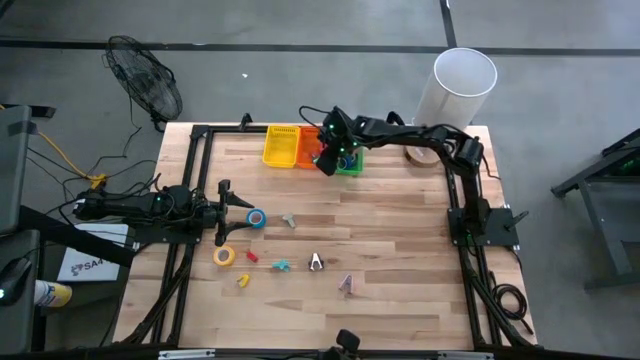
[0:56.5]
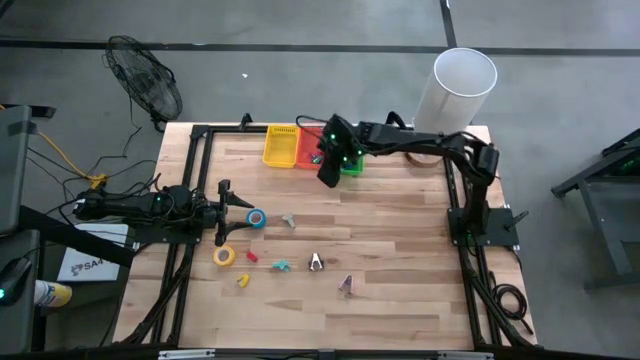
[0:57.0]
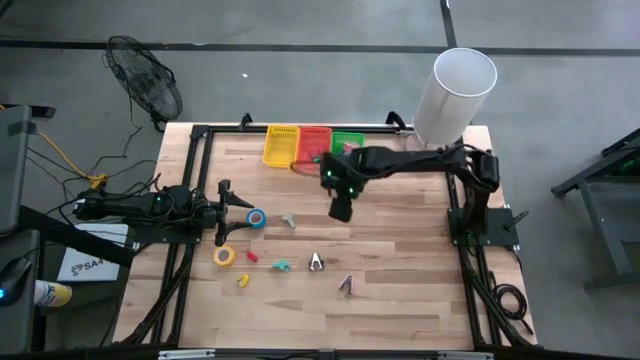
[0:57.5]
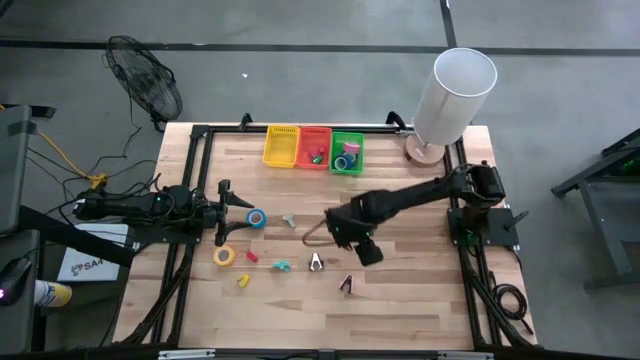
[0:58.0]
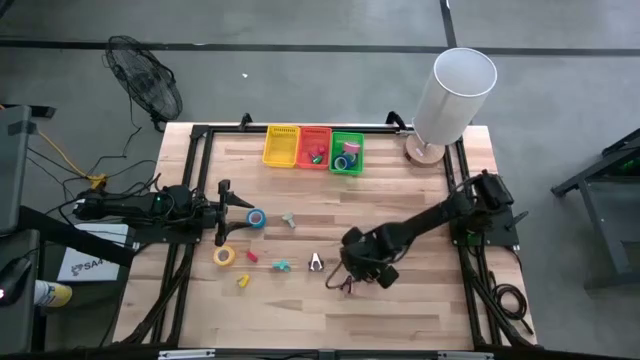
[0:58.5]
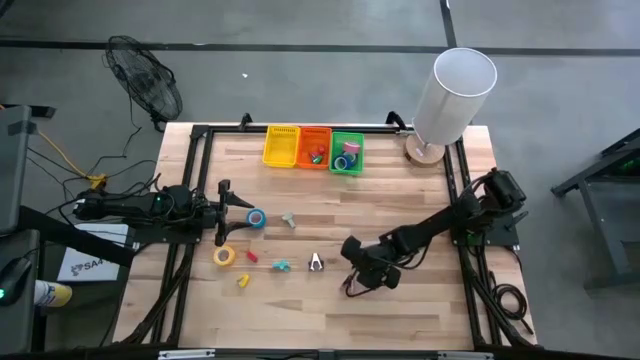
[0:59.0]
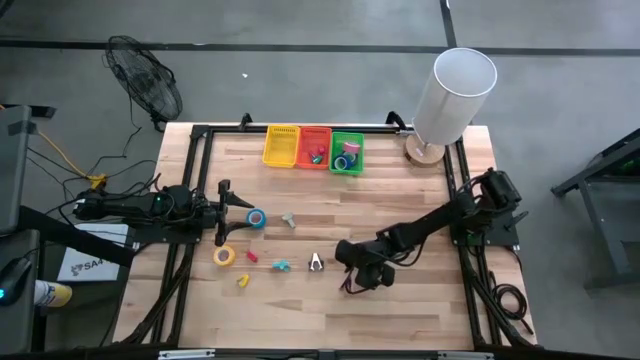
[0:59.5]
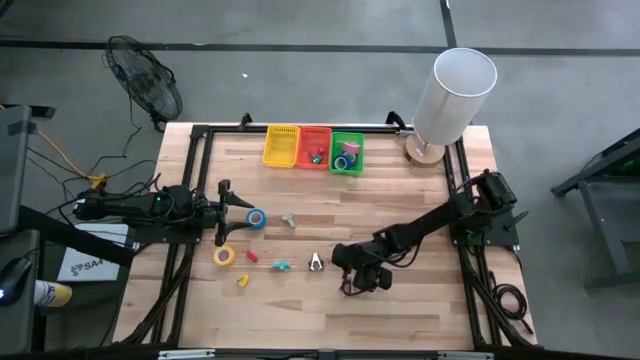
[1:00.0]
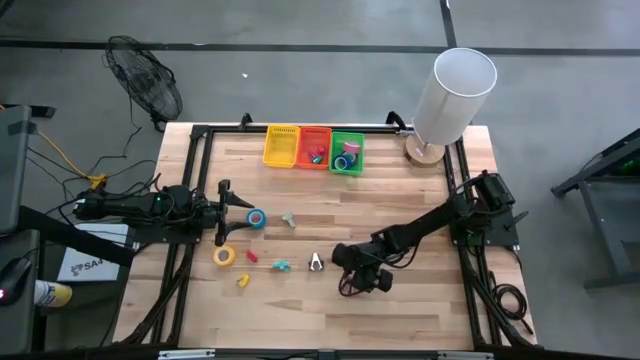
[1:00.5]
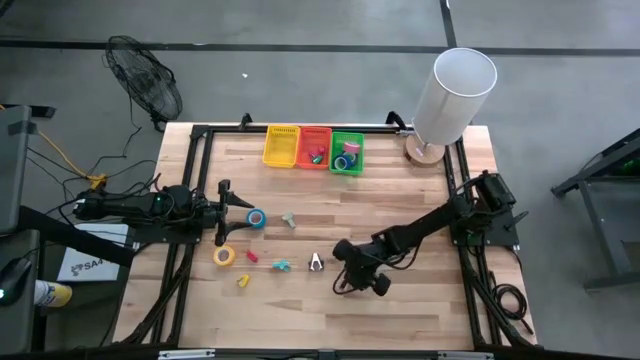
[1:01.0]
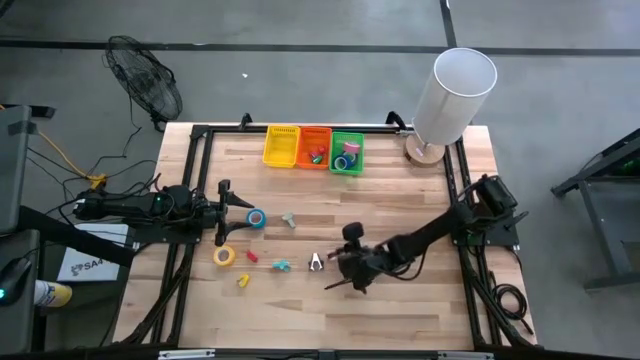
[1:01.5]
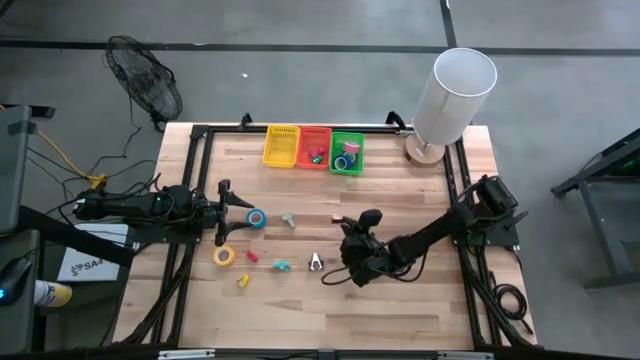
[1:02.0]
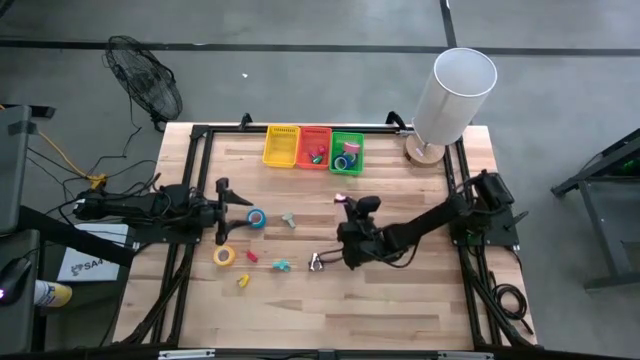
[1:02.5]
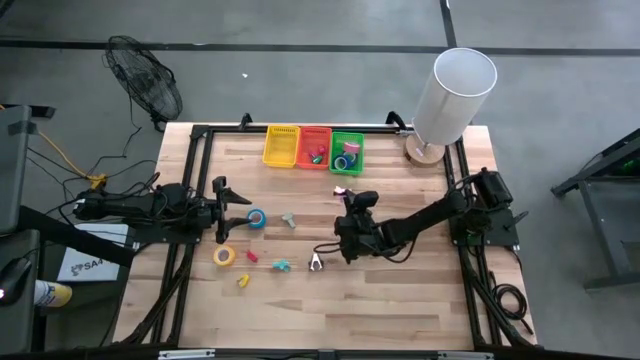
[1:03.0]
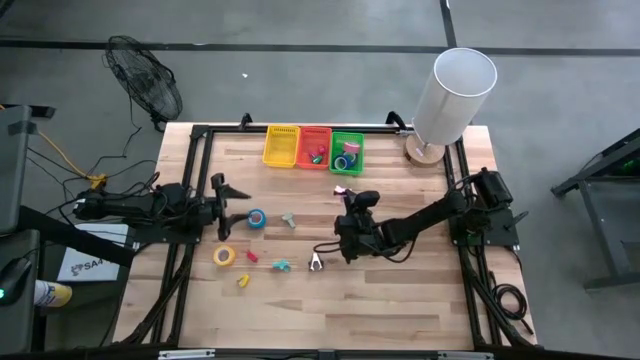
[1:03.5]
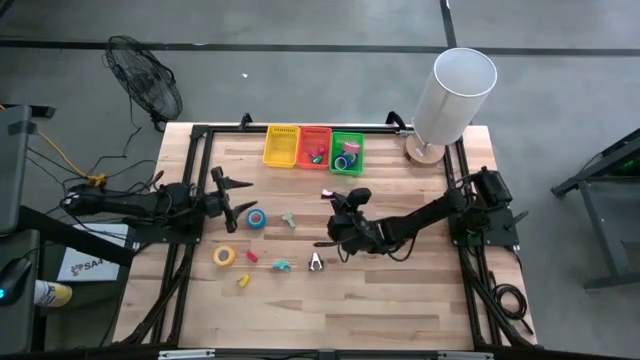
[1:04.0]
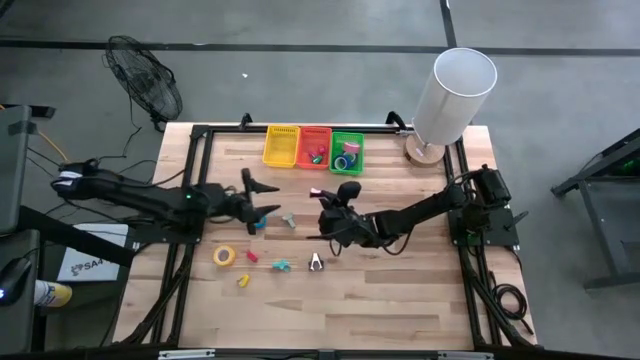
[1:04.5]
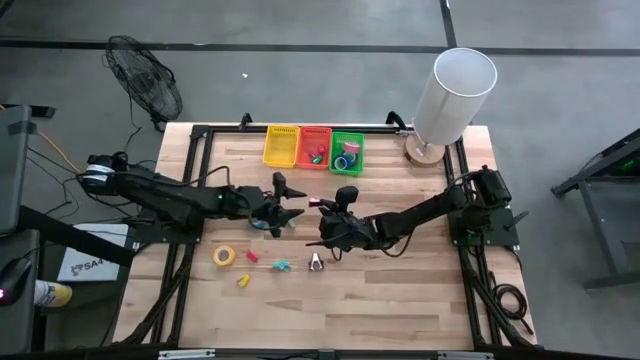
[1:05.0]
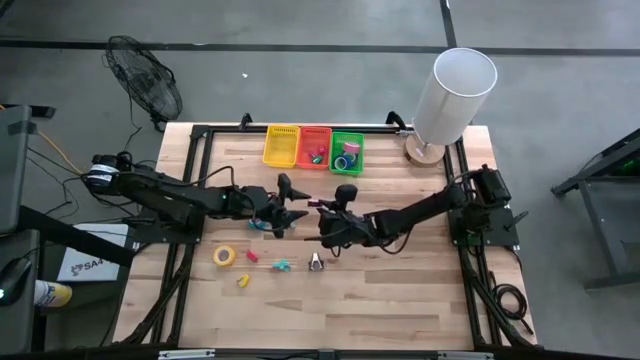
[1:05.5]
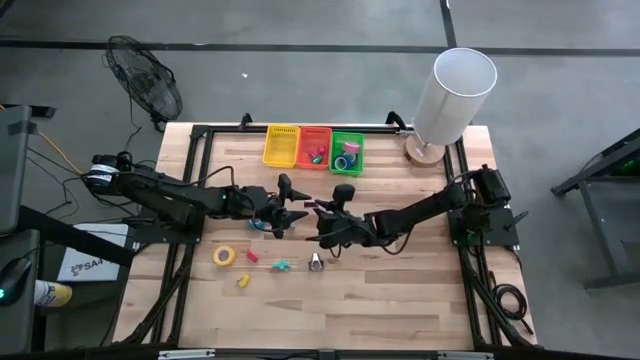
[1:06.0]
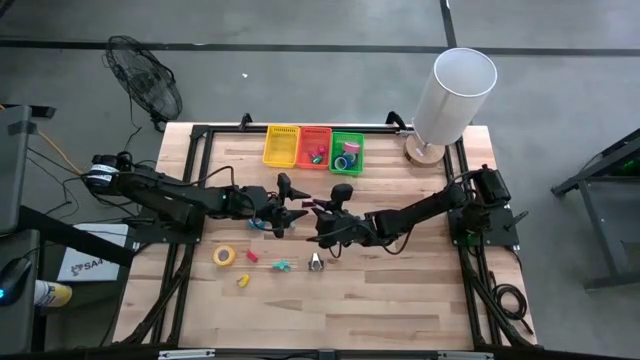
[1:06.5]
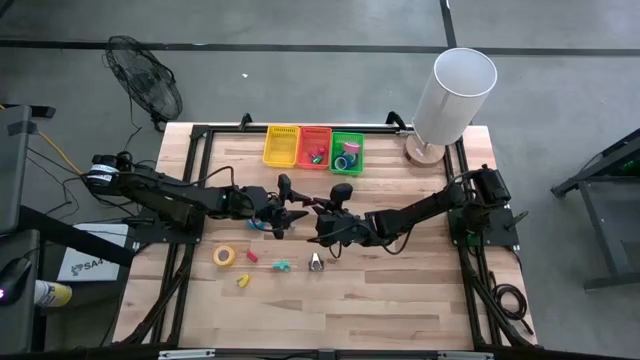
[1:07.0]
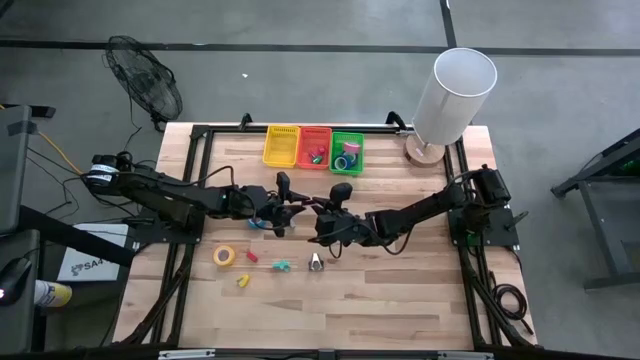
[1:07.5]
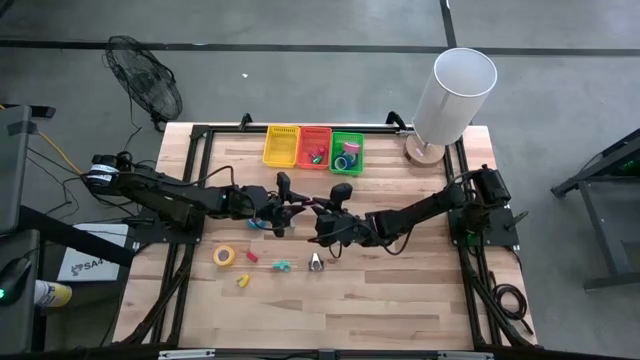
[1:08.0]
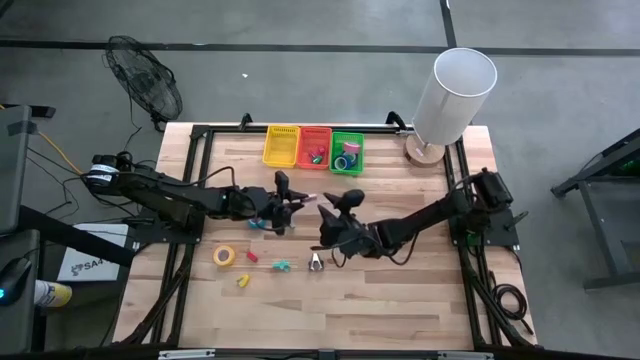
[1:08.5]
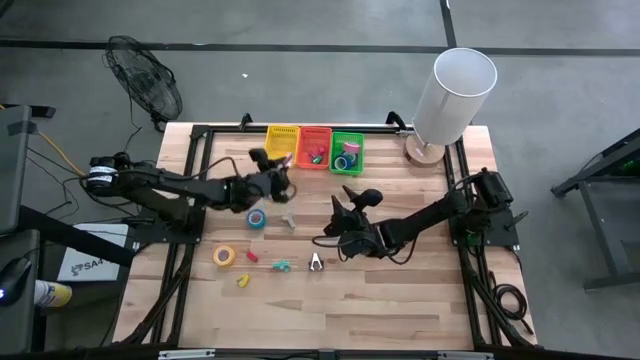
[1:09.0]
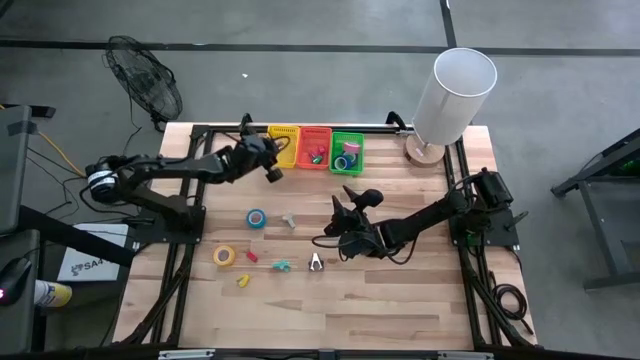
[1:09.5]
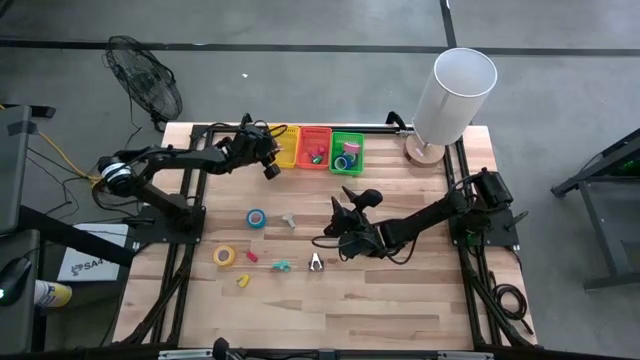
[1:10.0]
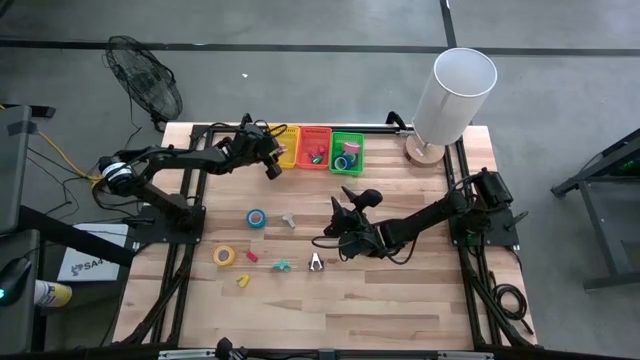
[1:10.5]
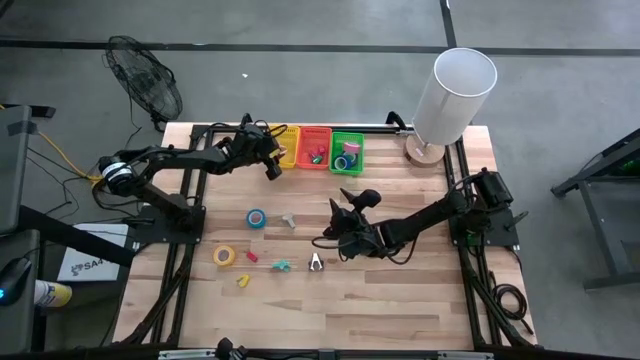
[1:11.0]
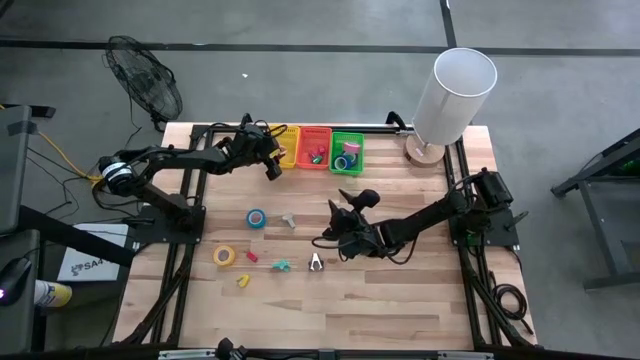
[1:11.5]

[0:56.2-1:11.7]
Task: Pick and place Stapler, Stapler remover, tape
Put the pink staple remover into the yellow basket

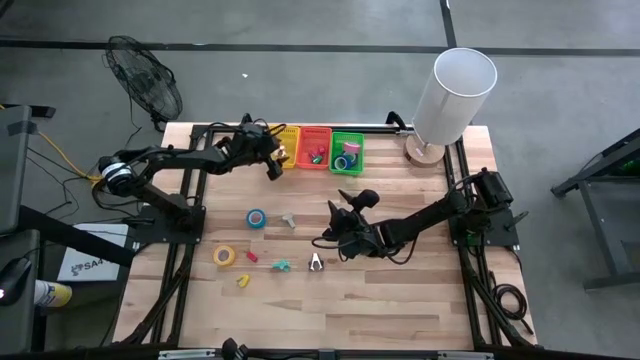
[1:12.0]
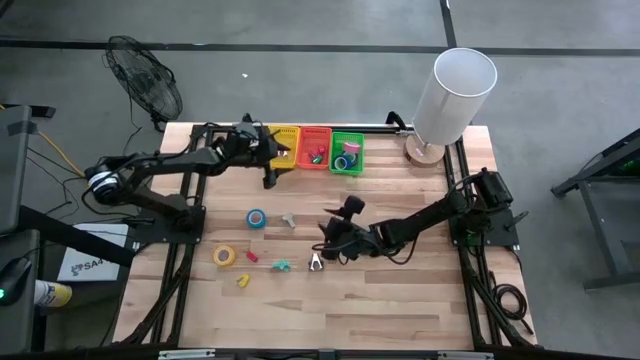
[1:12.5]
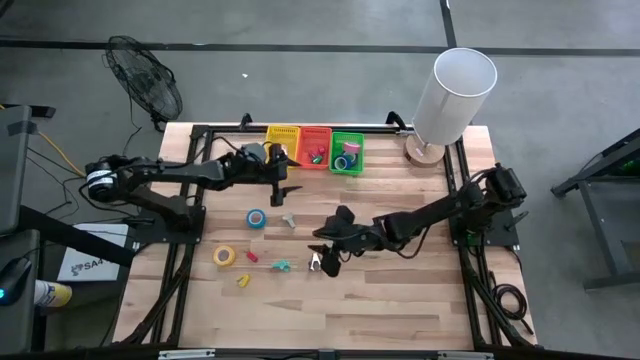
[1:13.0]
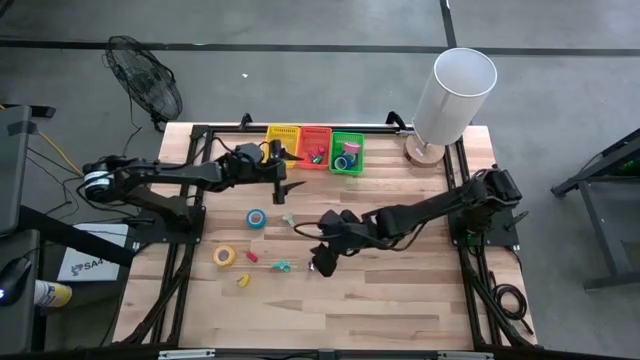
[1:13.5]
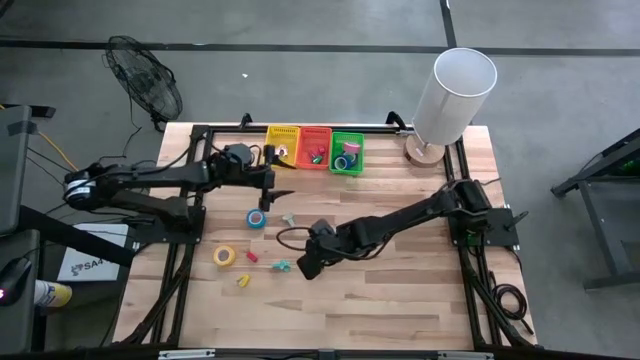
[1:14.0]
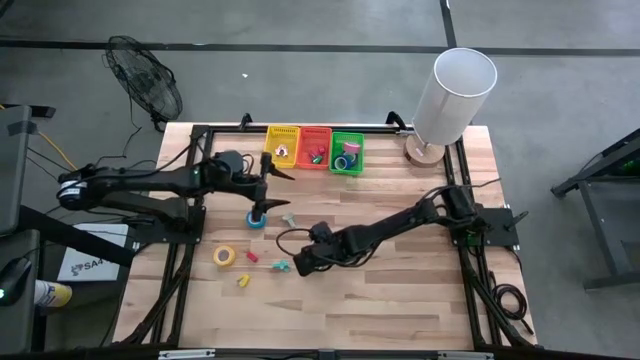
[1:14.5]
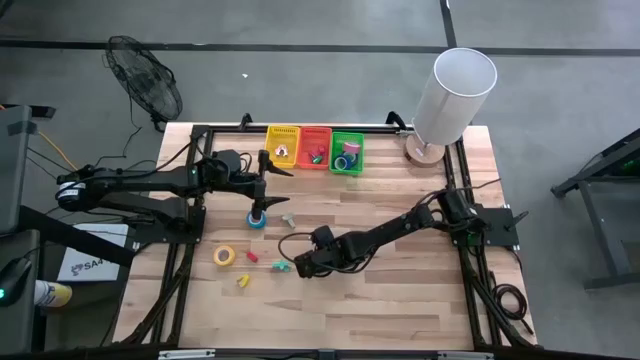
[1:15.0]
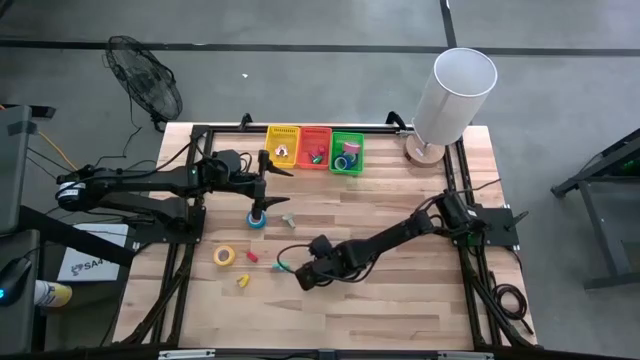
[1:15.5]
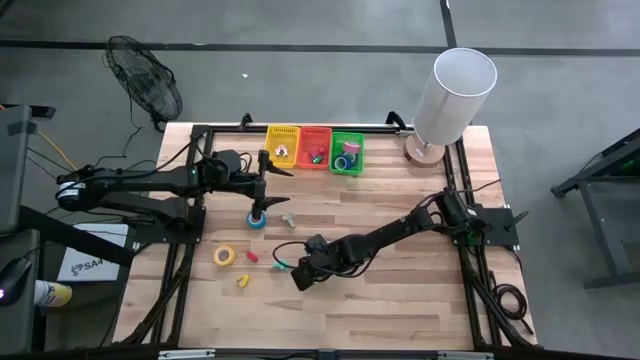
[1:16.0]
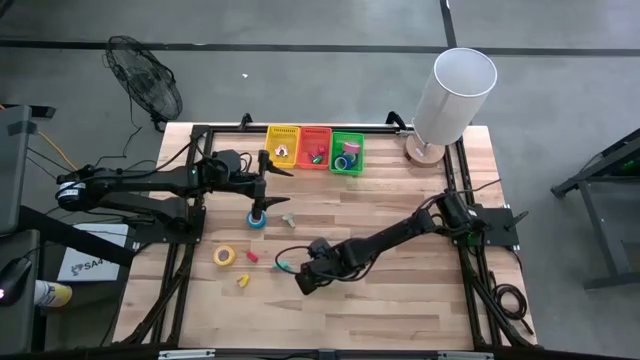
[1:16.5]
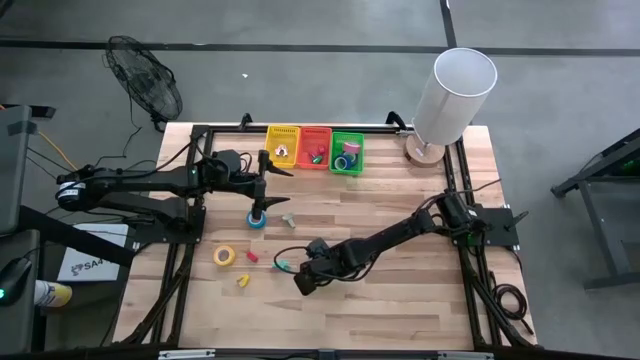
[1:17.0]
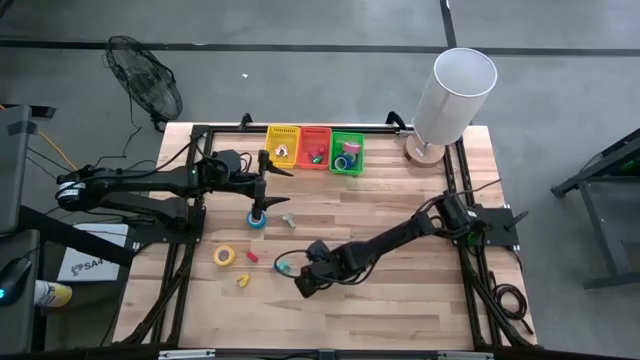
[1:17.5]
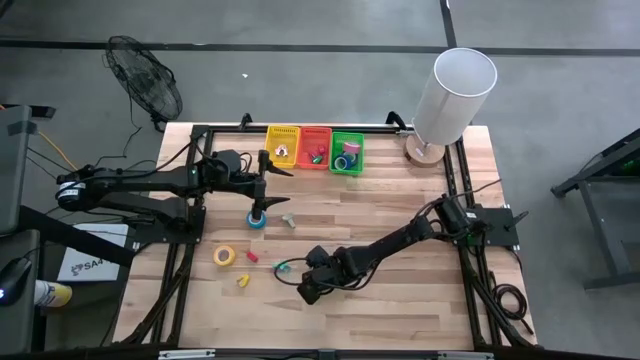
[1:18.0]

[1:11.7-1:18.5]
Put the black staple remover into the yellow basket
